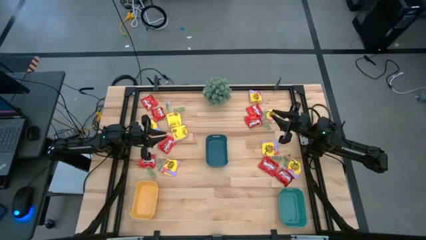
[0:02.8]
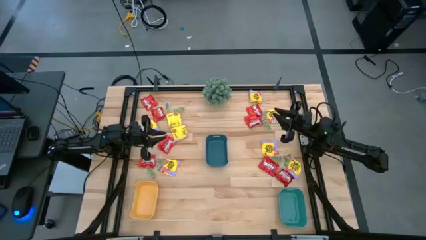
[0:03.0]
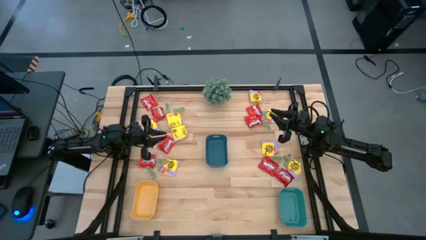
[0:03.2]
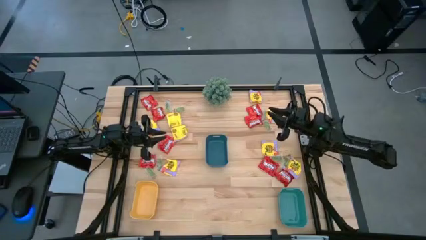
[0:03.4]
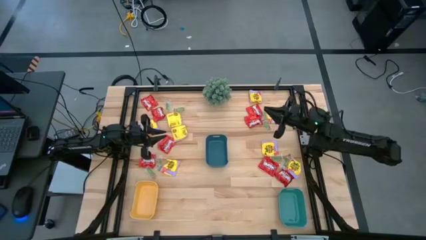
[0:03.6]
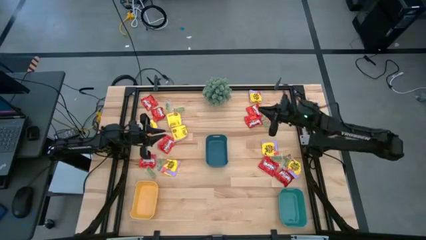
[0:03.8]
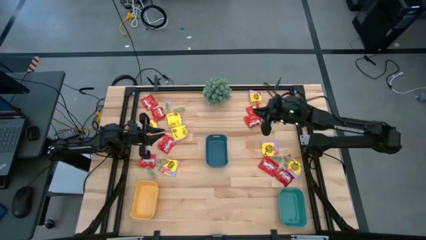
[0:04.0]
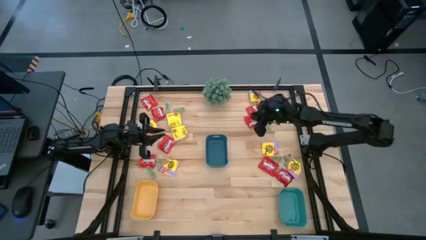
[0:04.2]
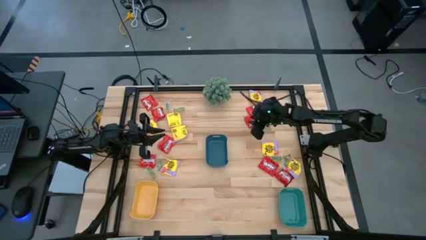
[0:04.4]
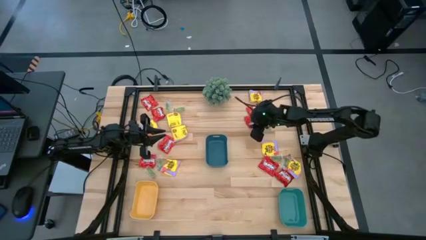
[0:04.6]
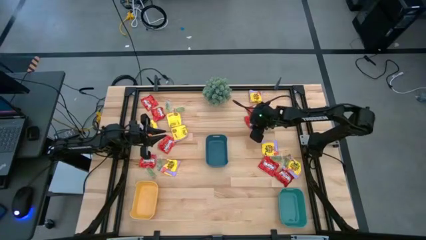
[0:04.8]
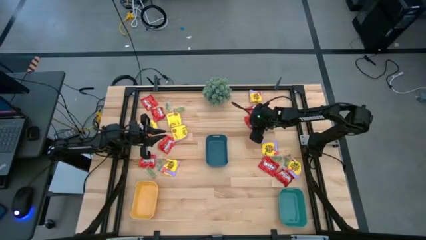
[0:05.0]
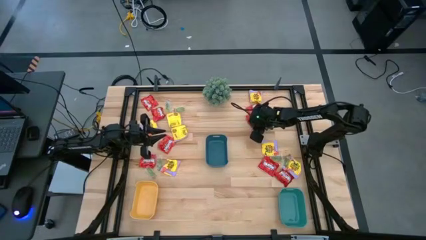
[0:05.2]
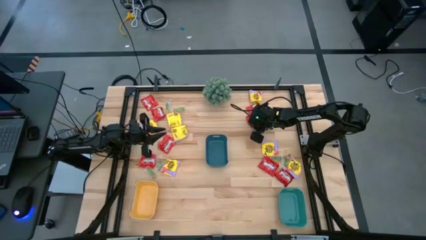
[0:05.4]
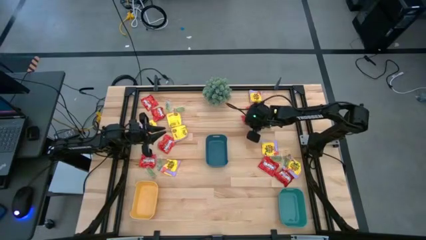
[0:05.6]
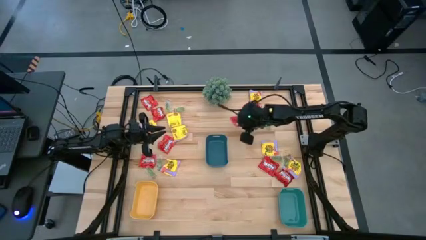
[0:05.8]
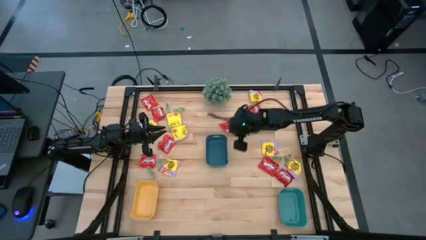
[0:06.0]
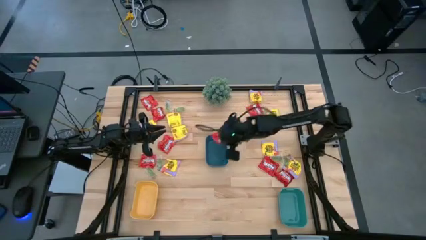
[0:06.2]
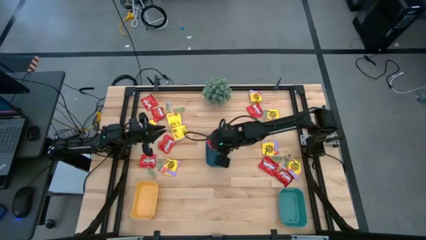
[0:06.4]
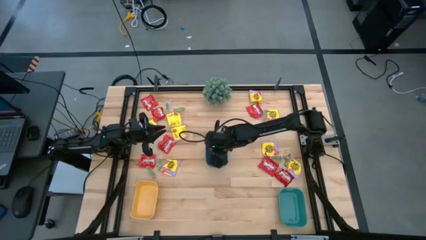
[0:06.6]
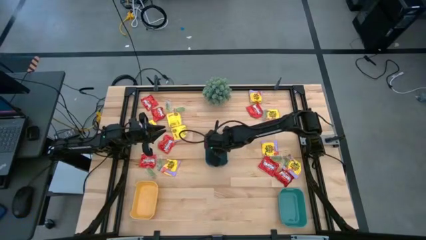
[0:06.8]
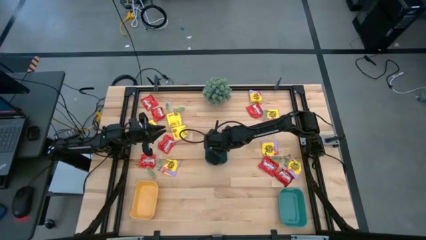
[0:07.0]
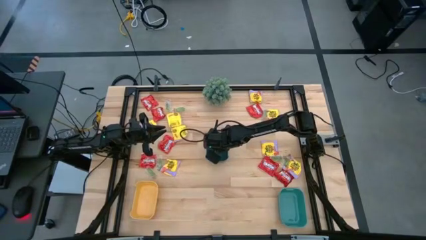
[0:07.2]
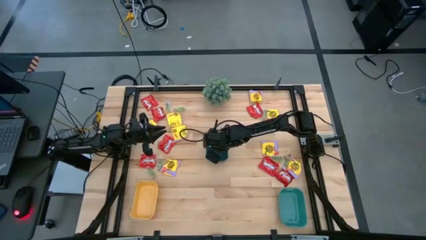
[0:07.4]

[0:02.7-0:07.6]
Task: Sort candy
Put the red candy pack into the blue bin

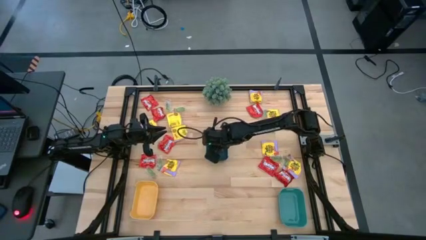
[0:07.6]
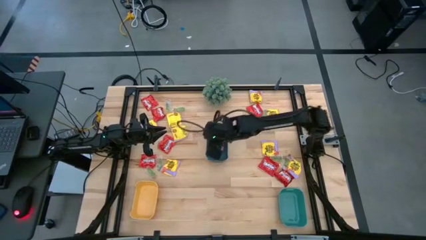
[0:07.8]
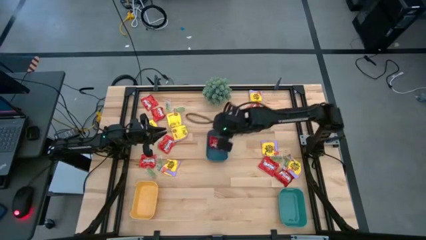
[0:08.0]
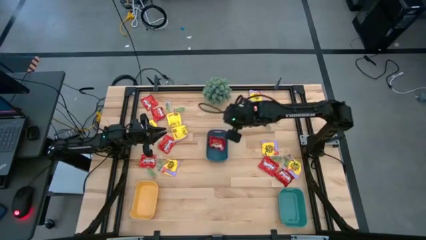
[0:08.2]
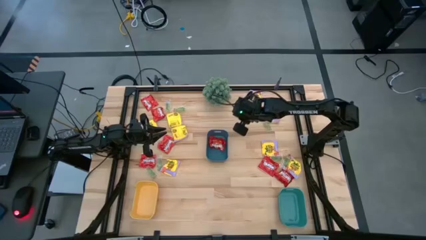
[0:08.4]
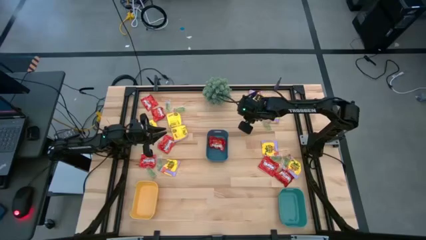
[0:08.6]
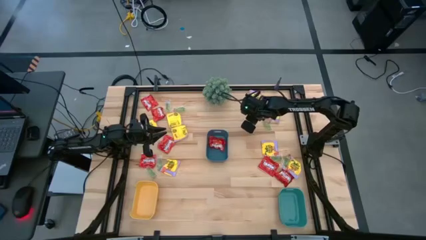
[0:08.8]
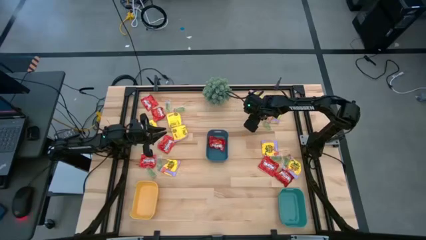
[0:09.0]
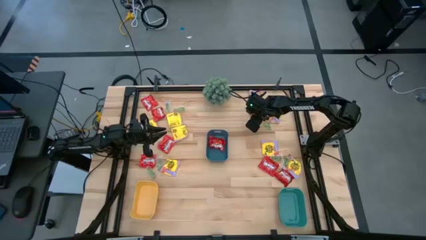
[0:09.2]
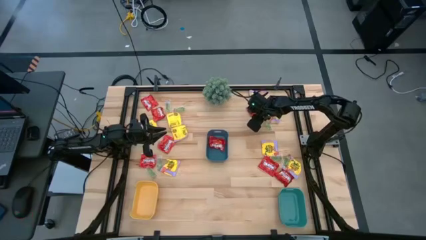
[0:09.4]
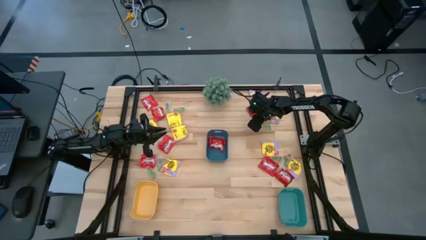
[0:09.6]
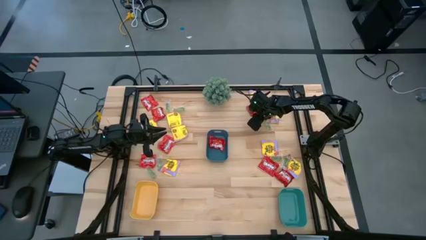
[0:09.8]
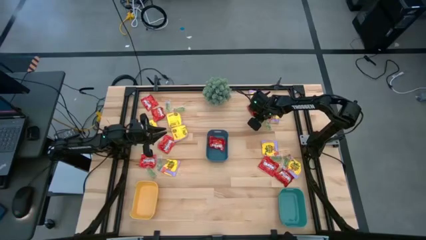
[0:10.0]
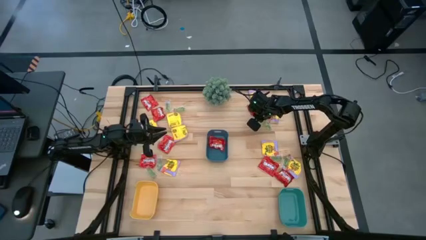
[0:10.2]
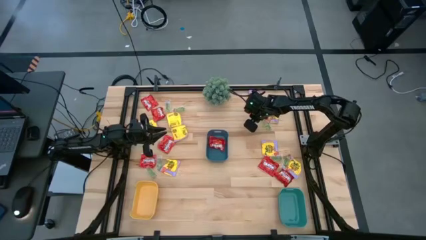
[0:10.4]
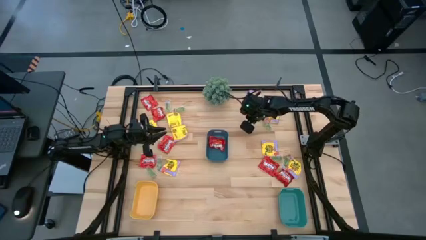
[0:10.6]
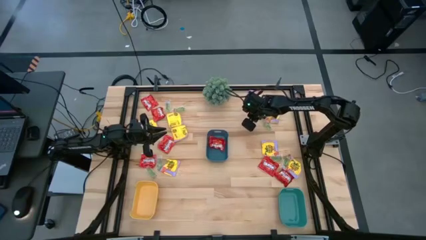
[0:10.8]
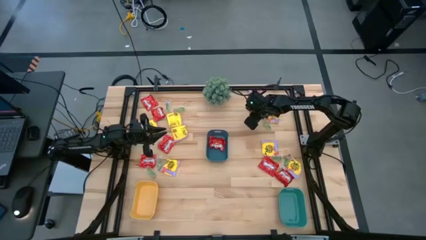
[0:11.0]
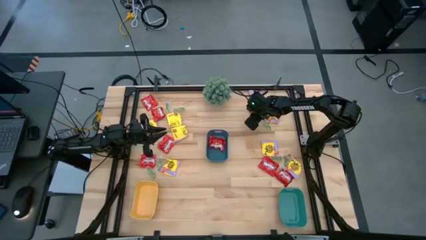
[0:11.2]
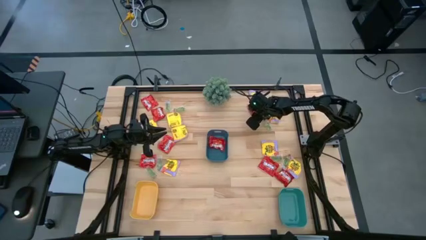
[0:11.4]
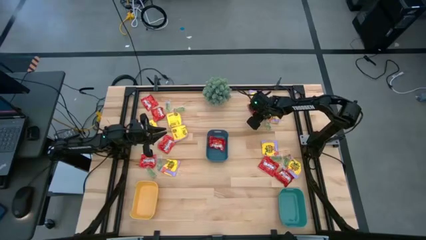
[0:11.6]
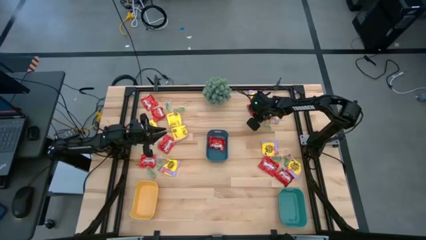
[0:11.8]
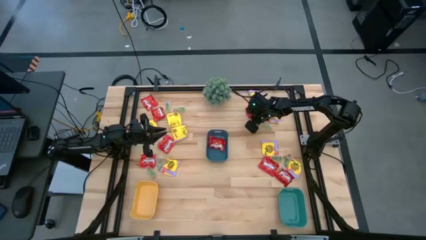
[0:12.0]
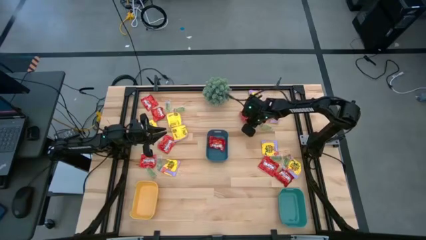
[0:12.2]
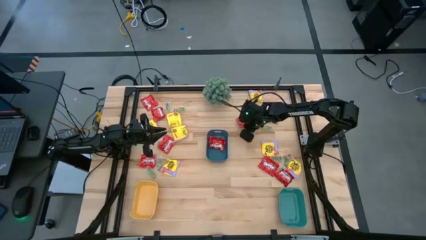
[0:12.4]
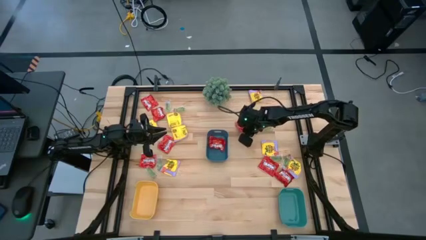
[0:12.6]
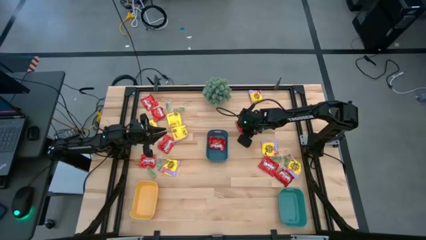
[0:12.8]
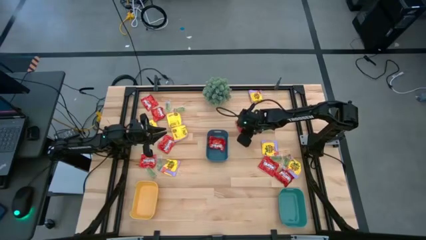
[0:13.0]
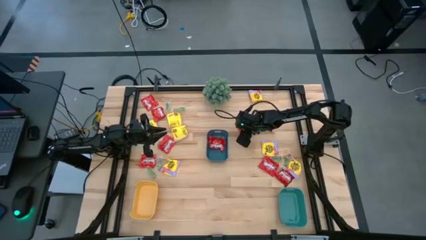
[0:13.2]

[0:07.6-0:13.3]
Put the red candy into the blue bin

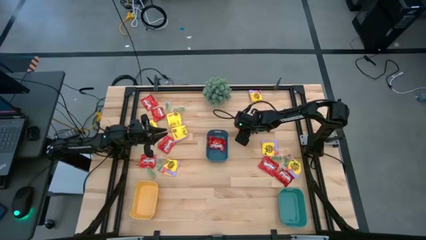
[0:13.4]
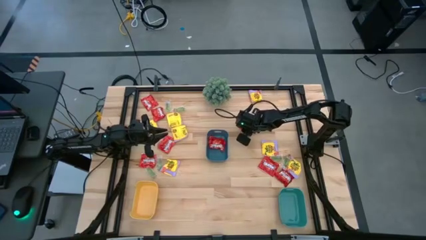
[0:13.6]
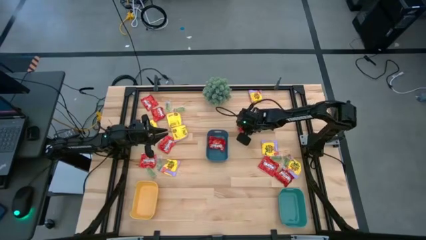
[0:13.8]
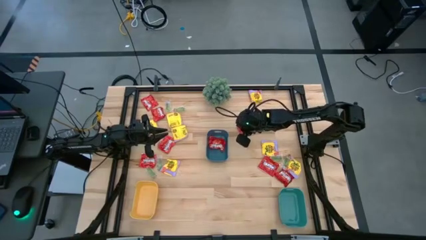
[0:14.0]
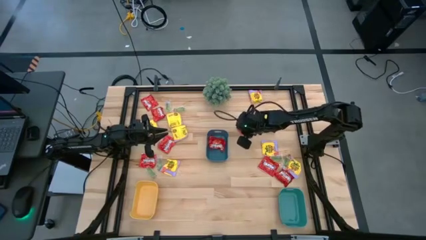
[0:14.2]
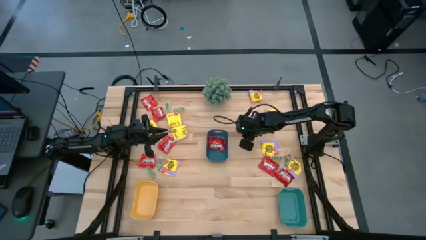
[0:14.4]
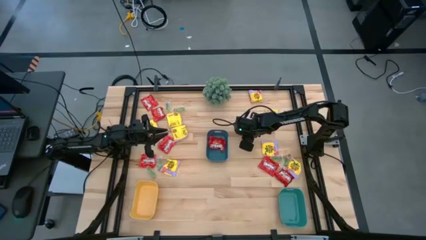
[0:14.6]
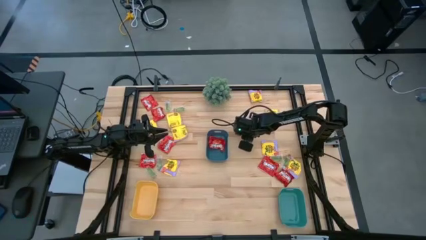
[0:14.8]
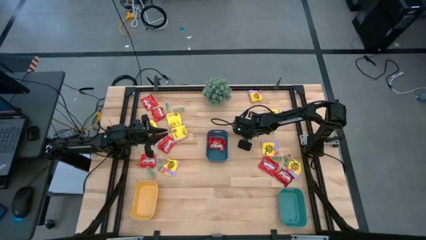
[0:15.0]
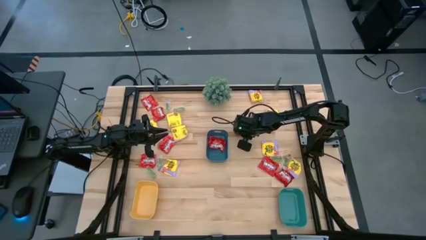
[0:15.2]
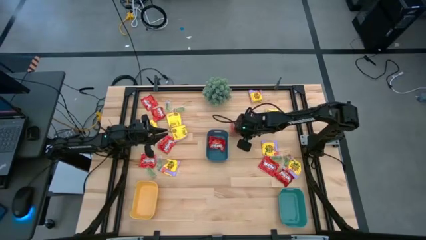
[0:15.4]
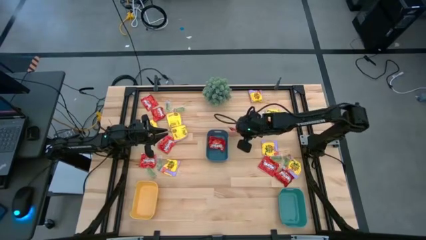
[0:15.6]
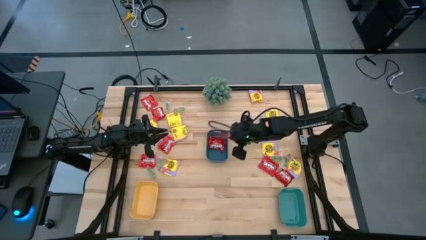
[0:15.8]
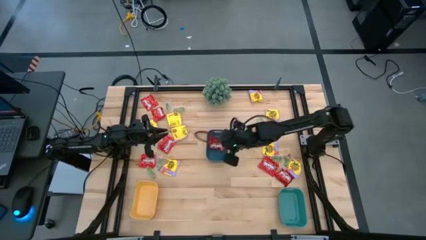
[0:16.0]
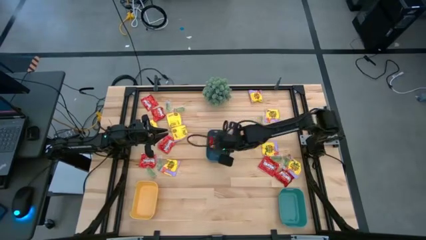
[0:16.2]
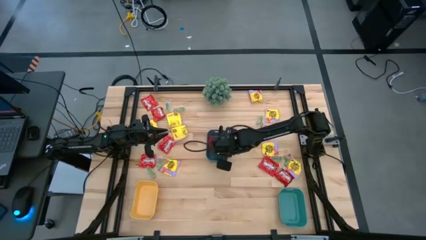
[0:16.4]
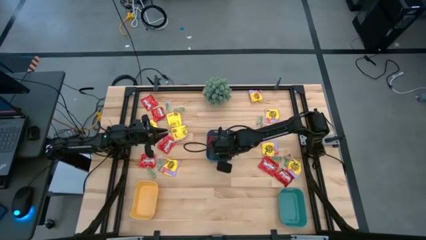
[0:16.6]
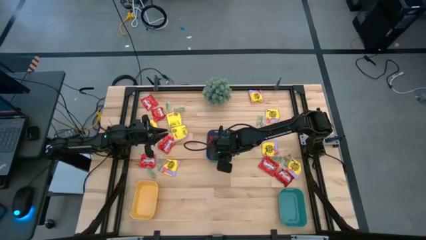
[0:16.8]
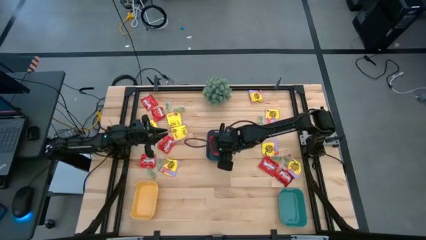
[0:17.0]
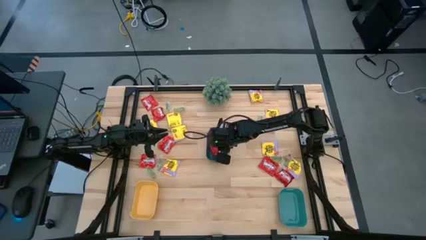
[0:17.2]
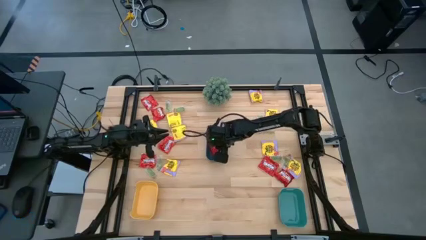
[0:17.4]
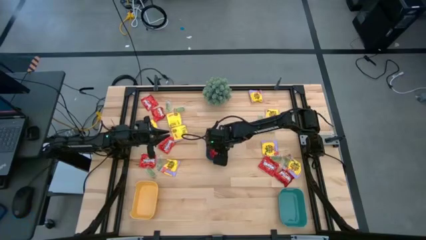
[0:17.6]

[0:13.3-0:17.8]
Put the red candy pack into the blue bin

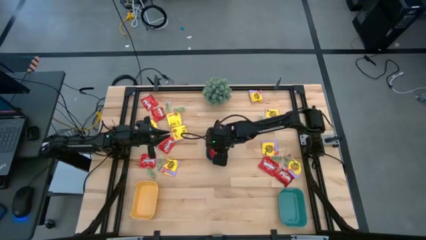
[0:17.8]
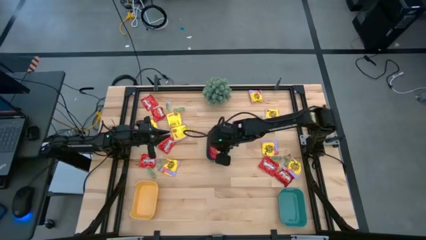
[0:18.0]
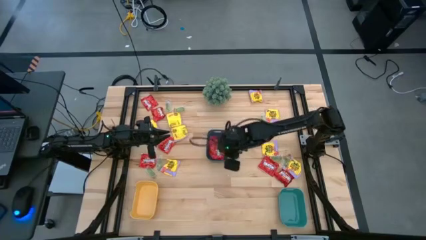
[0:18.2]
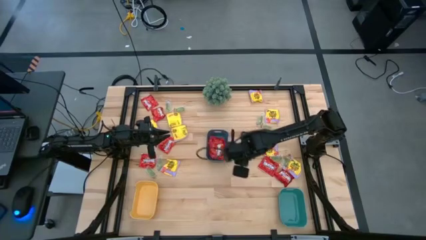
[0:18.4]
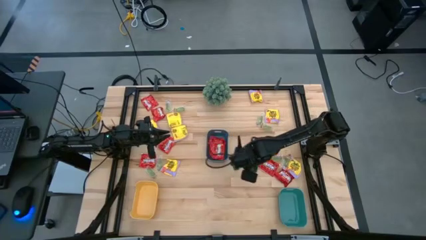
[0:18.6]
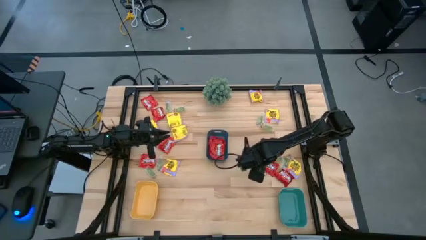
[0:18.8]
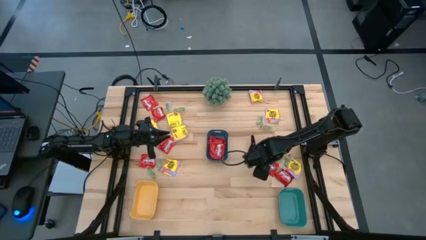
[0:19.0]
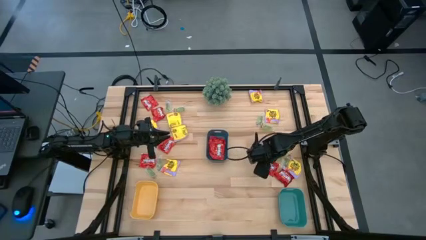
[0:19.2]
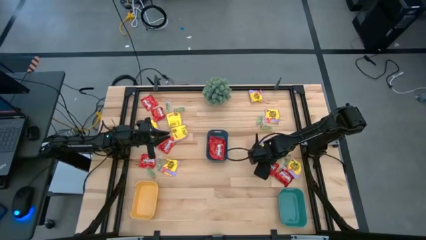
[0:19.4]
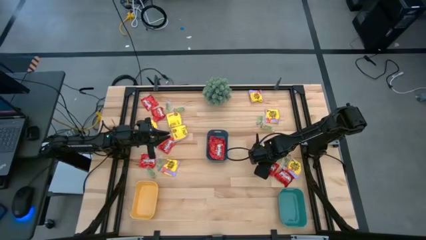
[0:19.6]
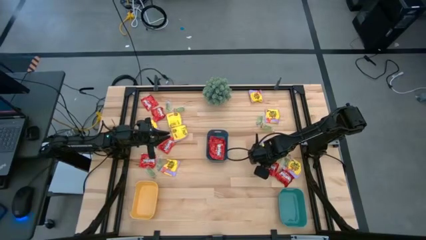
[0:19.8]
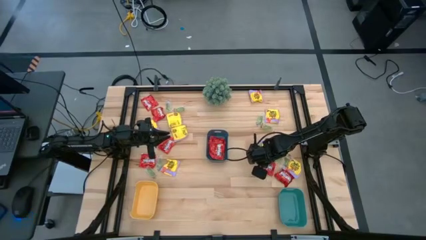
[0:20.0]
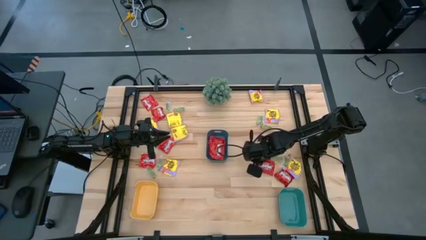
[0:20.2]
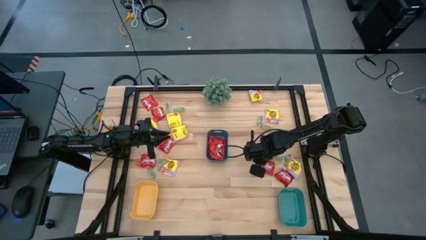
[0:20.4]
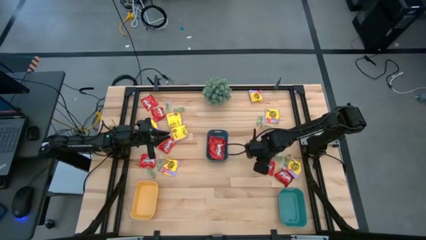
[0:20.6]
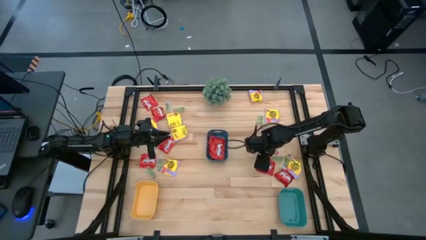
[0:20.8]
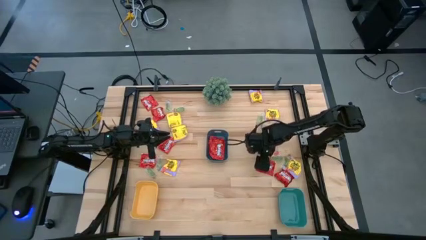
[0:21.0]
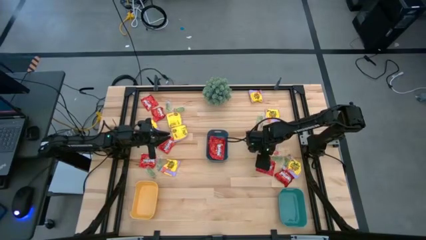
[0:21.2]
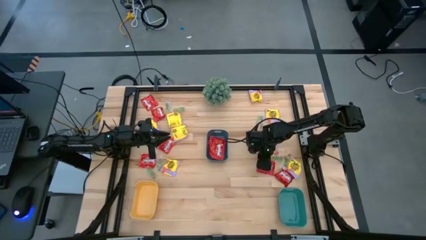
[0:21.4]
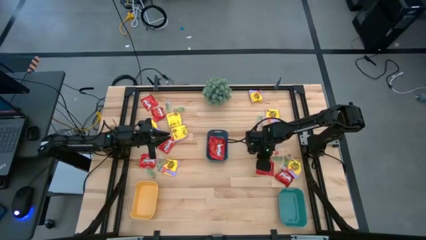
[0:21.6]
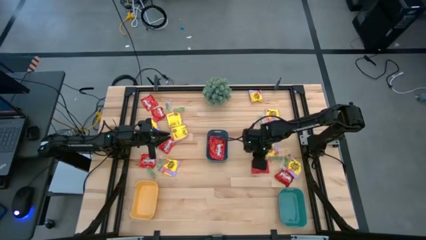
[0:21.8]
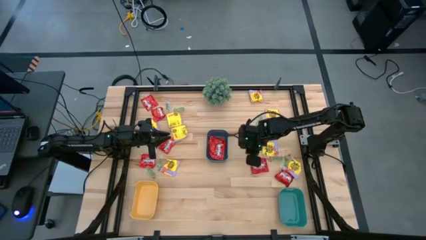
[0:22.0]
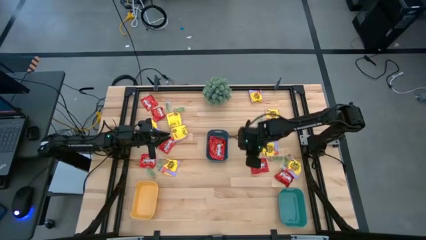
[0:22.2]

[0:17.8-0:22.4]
Put the red candy pack into the blue bin
